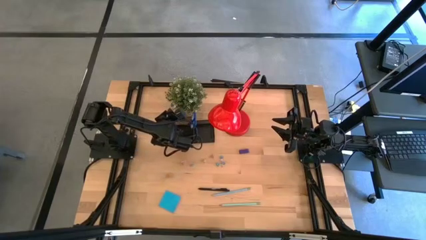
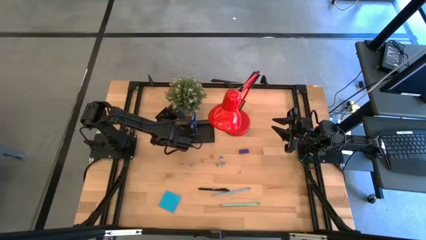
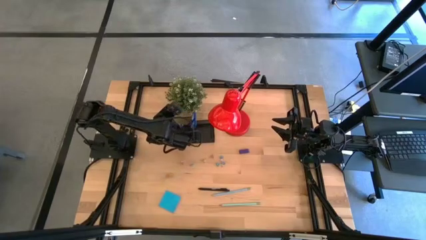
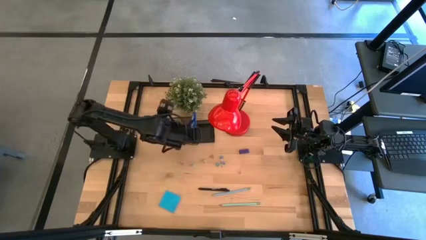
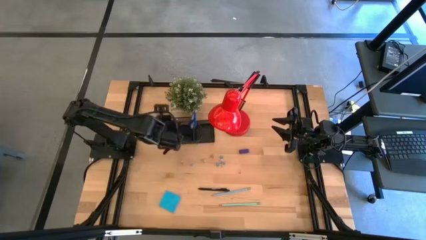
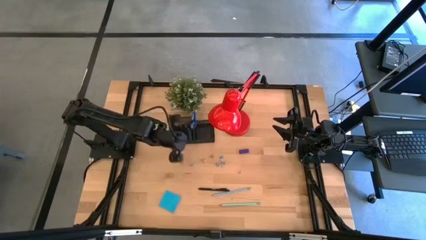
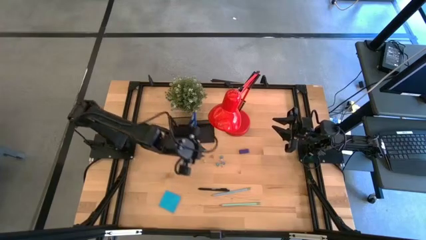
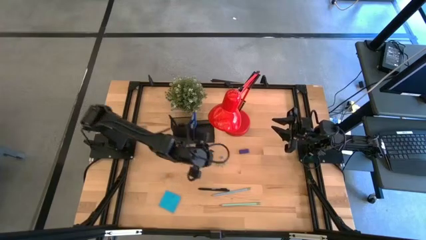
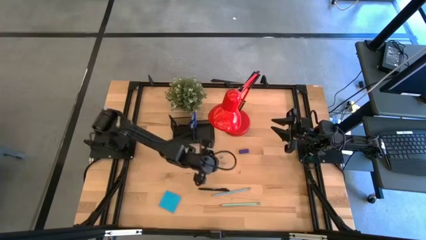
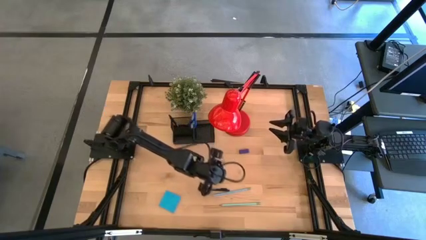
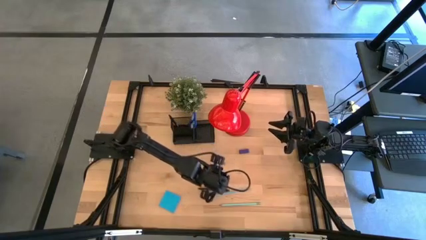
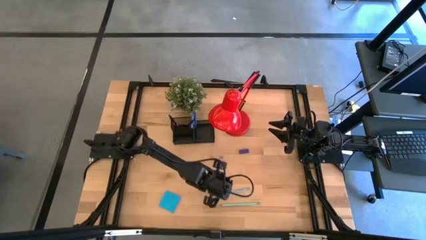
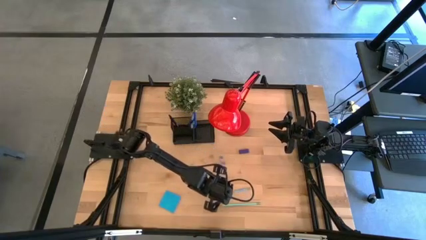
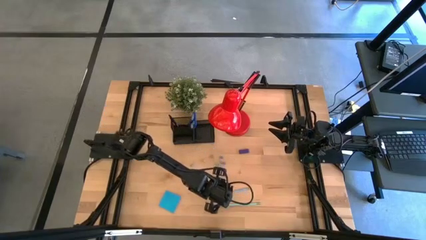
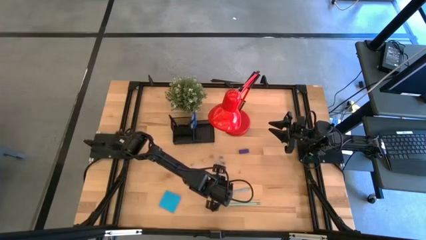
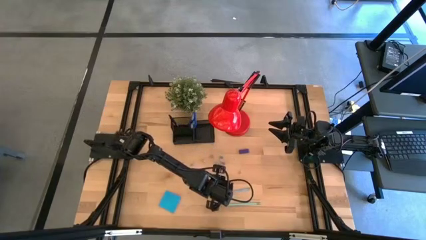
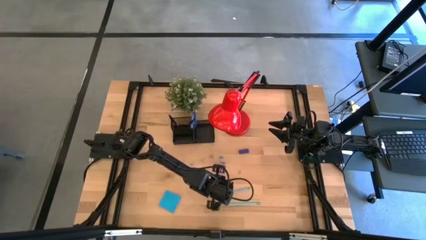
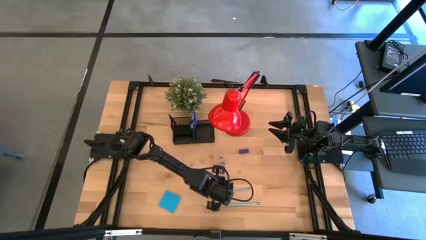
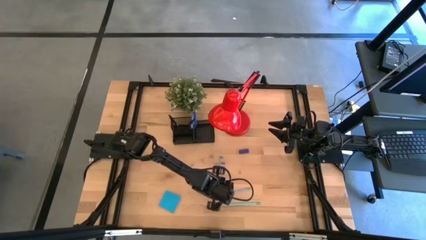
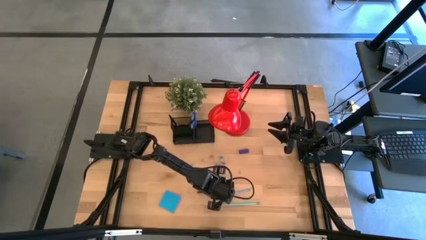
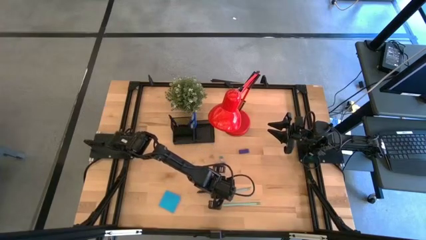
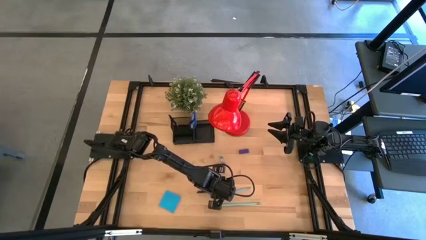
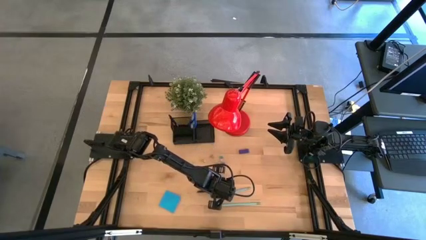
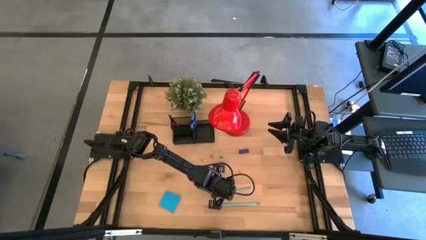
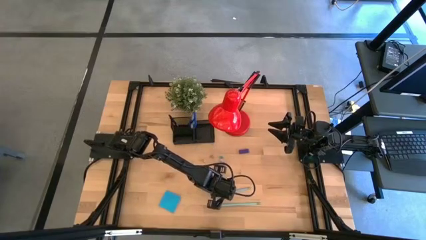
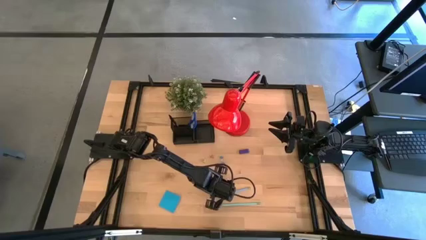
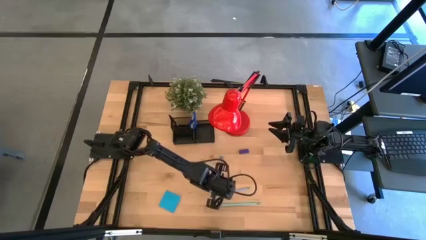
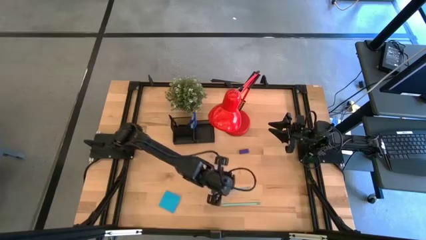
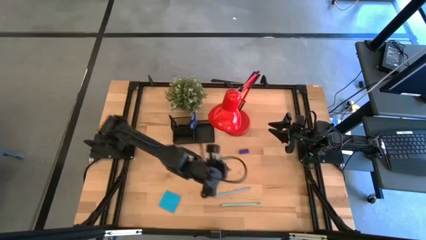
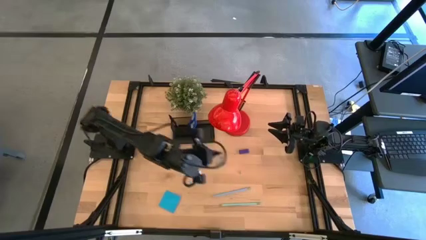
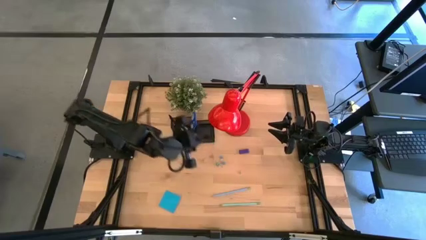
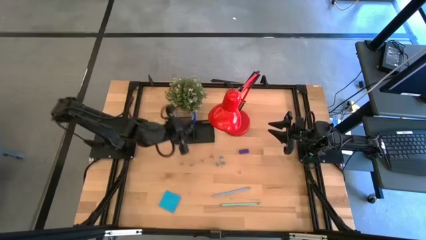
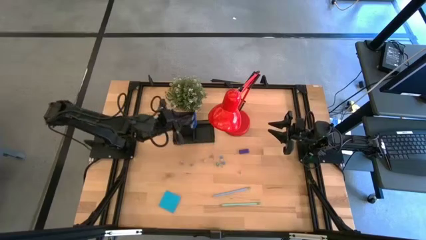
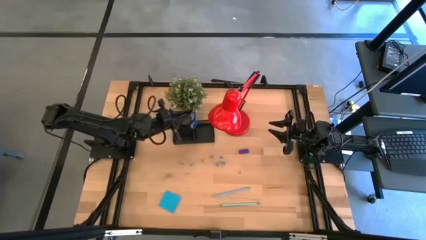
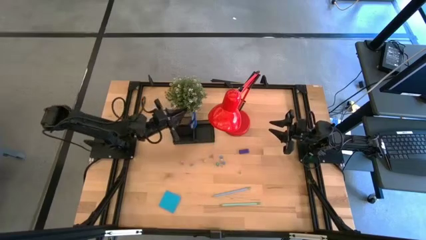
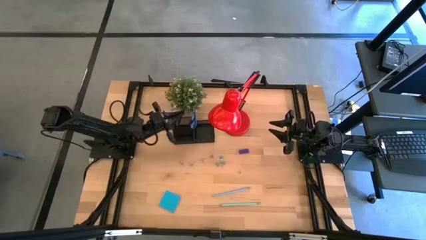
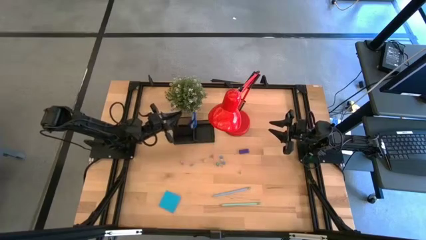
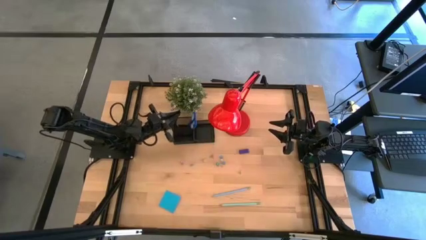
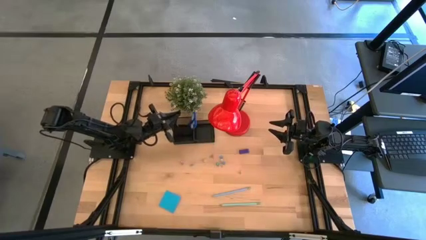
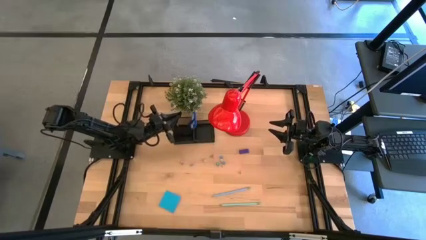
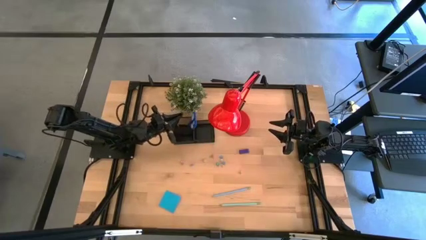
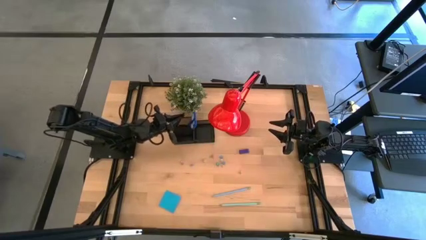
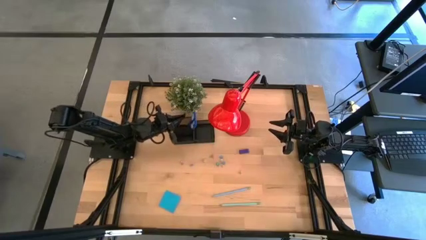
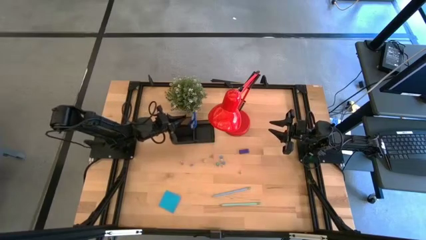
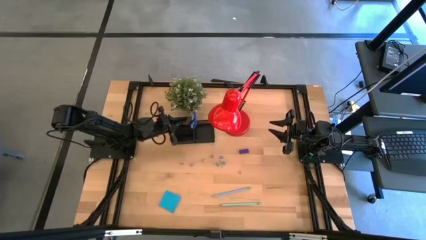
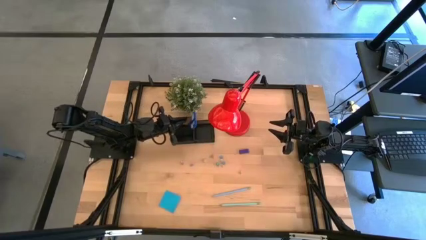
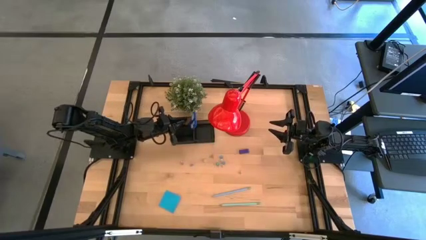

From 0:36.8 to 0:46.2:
Task: Pick and place office supplies into organizer
Put the black pen into the black desk organizer
